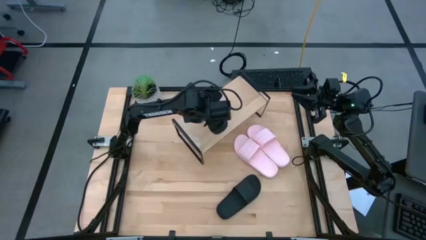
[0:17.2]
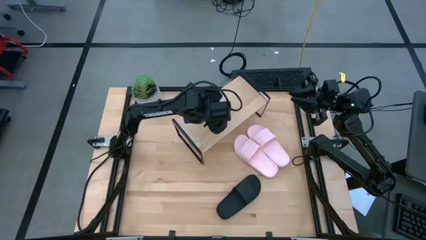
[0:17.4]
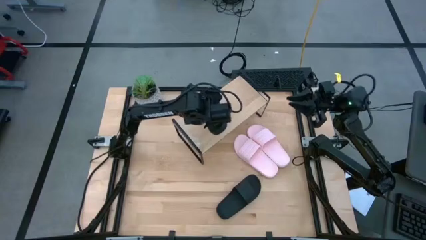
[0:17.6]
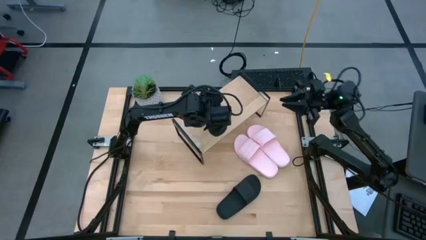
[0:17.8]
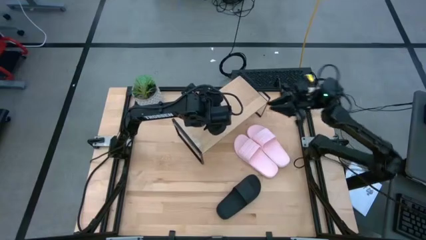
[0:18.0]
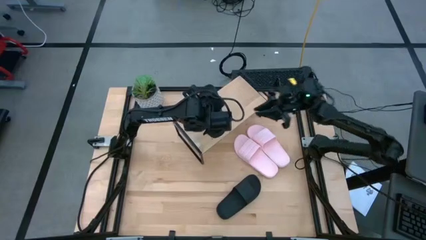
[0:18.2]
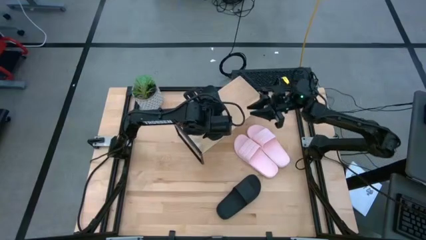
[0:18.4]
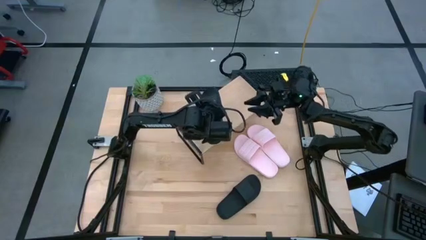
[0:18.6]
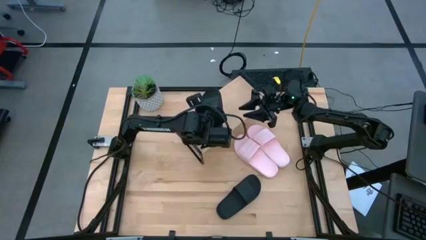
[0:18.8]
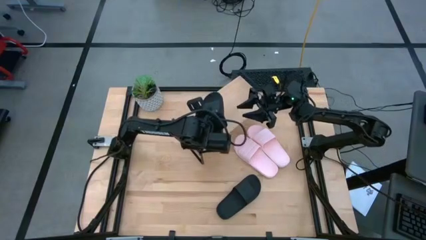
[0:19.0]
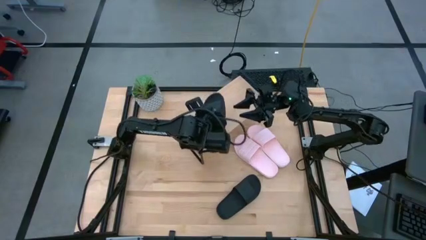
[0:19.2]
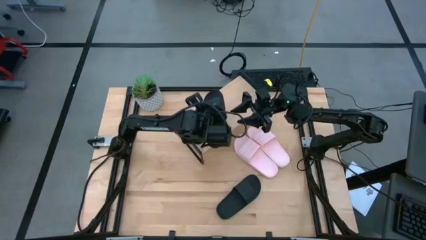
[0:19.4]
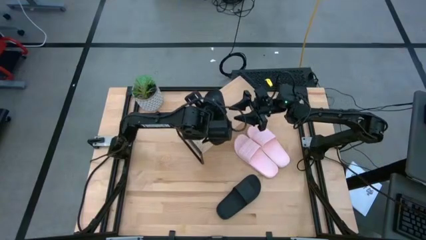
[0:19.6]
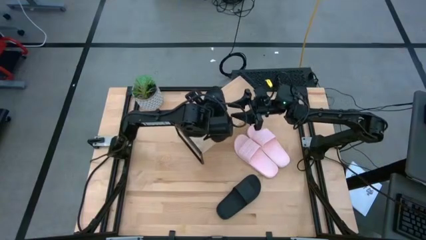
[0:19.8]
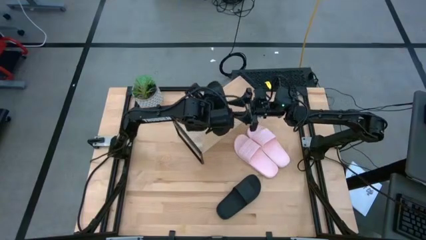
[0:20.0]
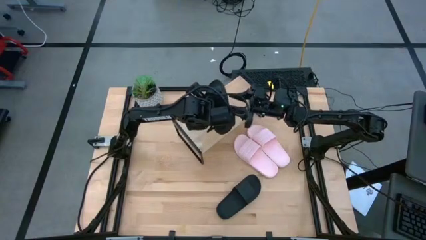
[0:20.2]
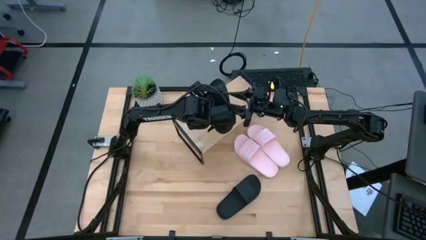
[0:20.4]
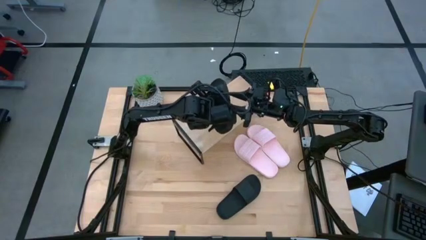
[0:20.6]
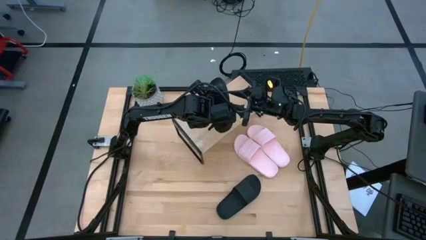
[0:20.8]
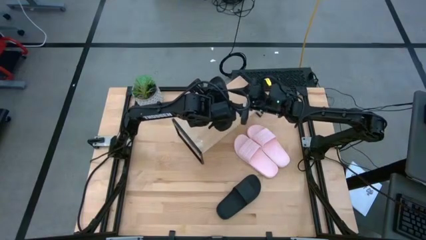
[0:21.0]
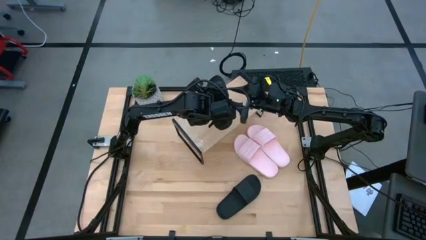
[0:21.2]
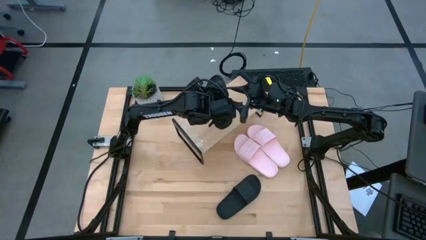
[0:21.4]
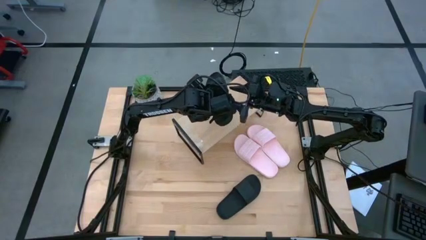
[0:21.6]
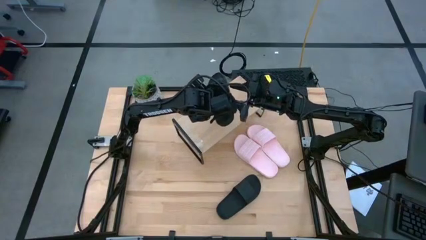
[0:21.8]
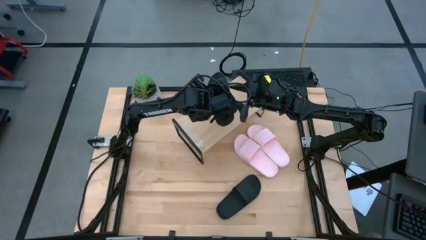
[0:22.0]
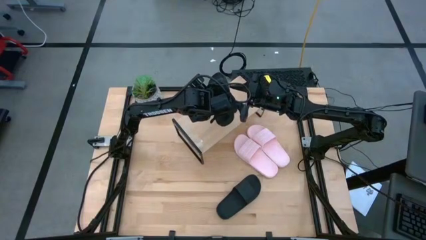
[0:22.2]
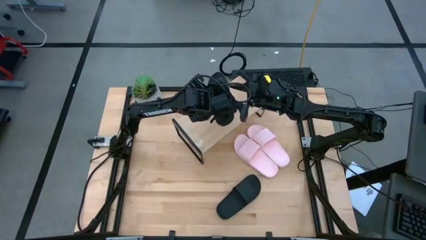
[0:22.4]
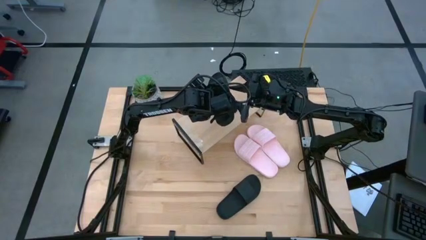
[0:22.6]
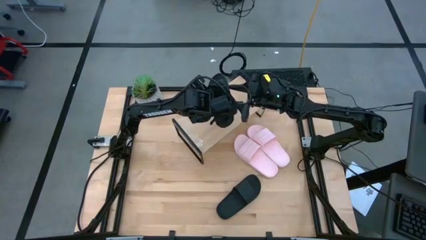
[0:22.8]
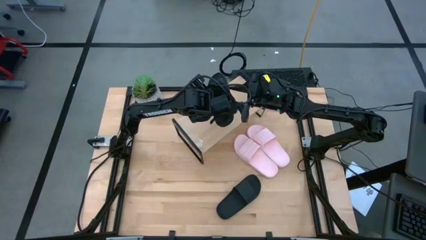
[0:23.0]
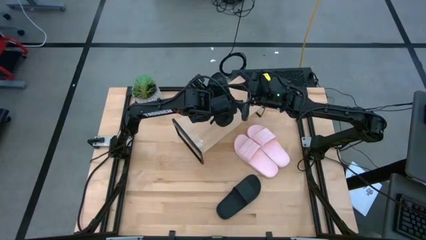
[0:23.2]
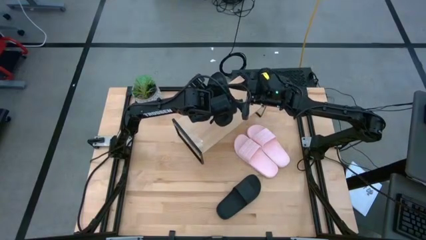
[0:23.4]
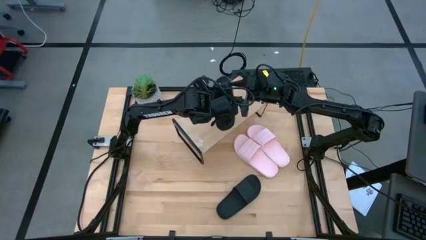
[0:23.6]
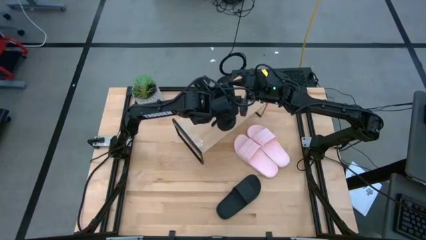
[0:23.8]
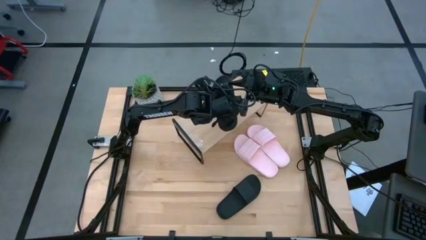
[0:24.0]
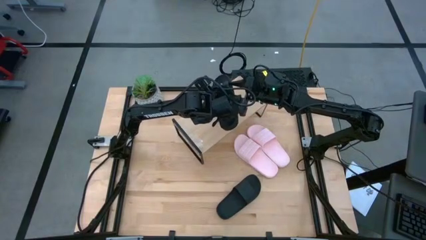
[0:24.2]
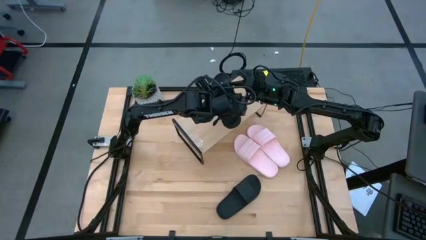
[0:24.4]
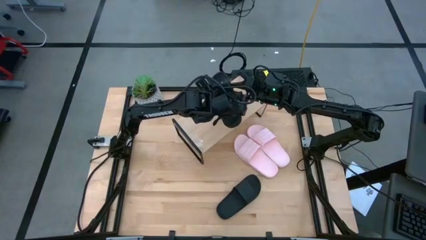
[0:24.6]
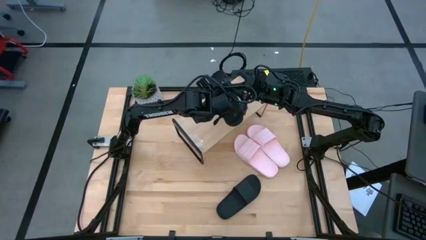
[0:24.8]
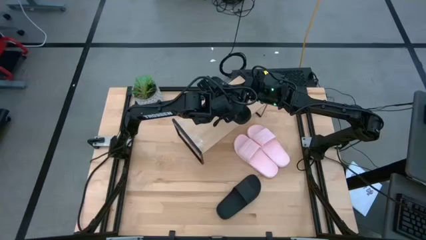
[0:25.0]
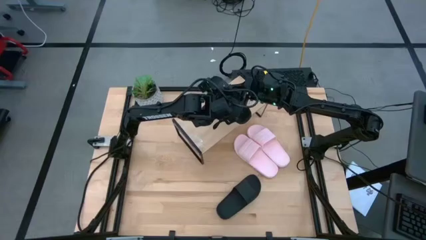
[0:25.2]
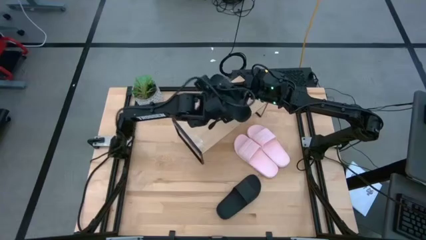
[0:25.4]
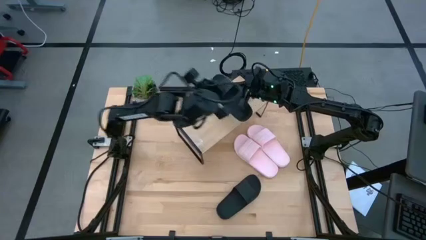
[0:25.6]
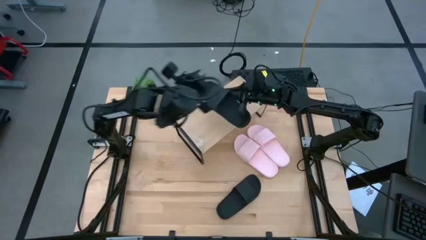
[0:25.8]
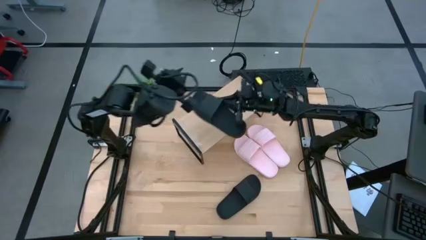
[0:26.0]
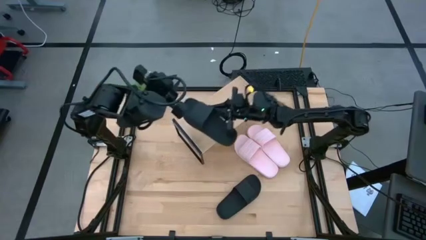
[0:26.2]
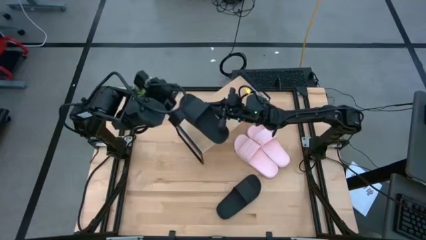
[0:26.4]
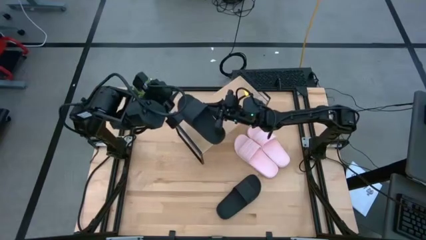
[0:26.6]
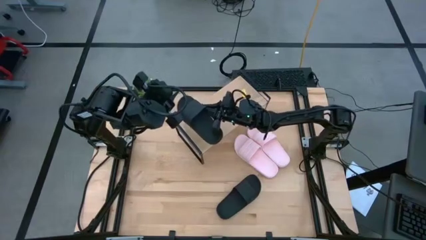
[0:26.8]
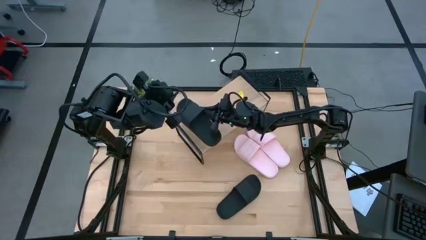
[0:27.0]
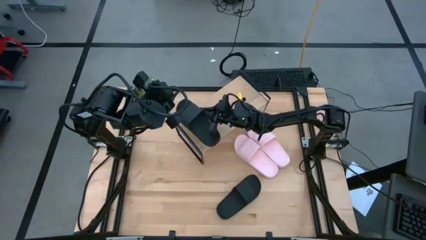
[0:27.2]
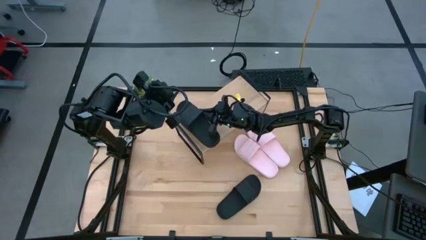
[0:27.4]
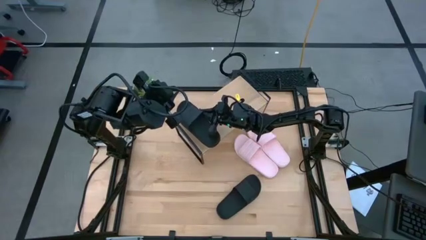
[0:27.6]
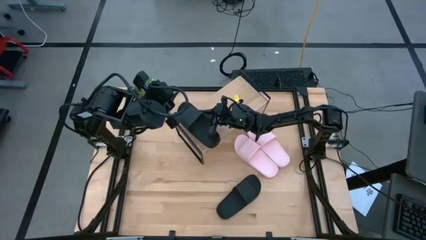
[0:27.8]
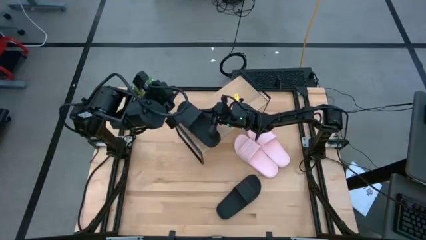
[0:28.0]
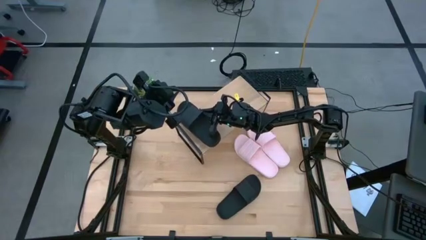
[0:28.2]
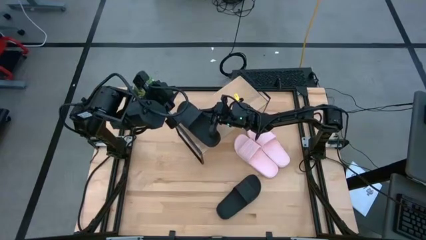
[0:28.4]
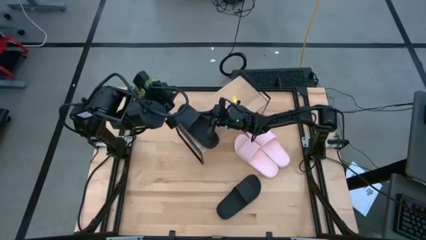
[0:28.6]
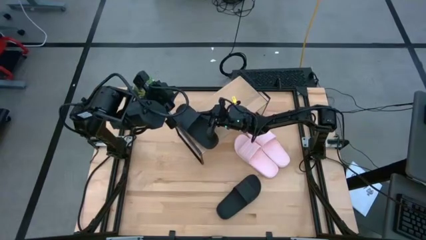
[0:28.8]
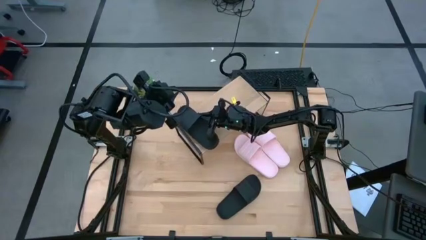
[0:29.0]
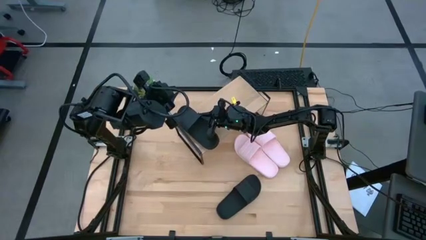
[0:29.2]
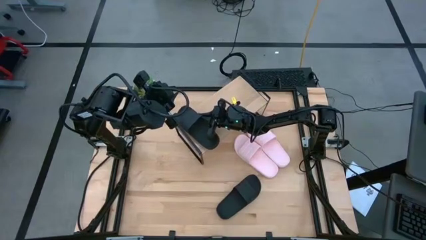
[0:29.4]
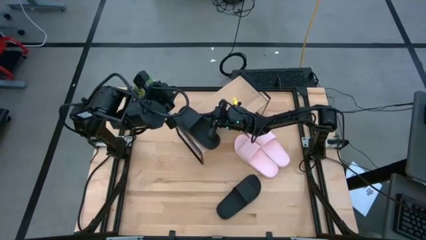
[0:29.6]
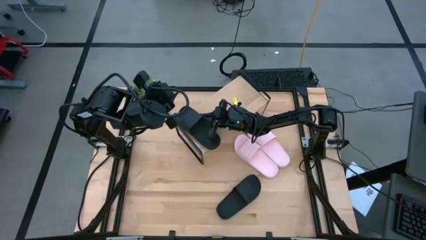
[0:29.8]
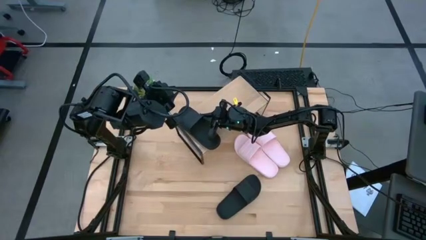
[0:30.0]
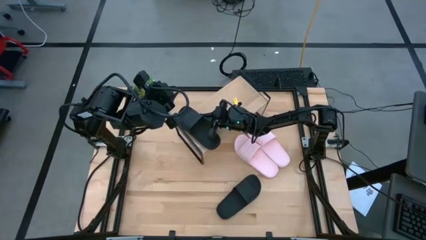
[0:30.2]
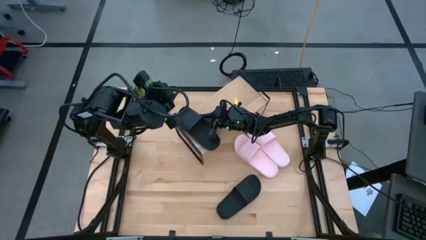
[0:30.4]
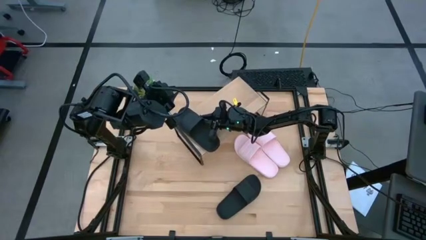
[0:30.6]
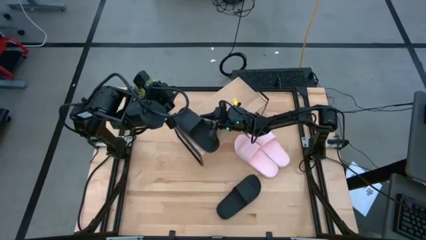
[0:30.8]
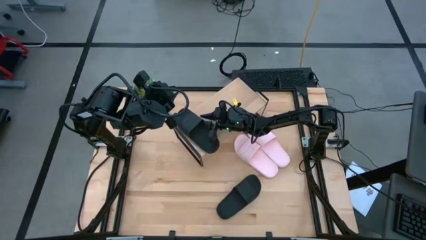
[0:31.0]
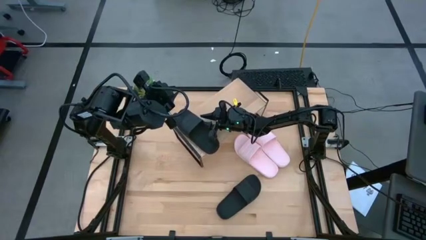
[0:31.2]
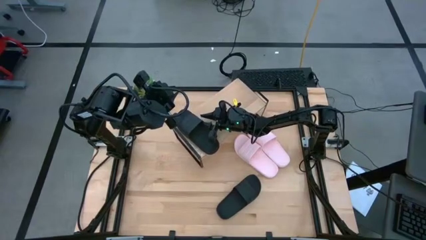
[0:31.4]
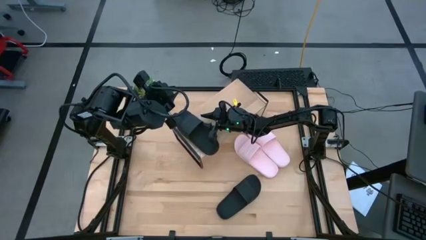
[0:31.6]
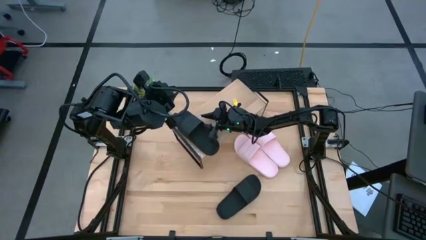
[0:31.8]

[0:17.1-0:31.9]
Task: Pick and place slides into the shelf
Put the left black slide on the shelf
